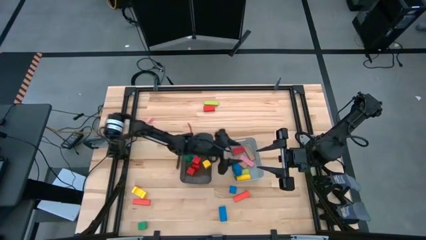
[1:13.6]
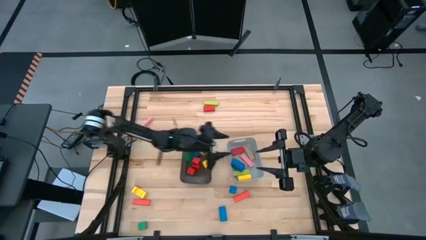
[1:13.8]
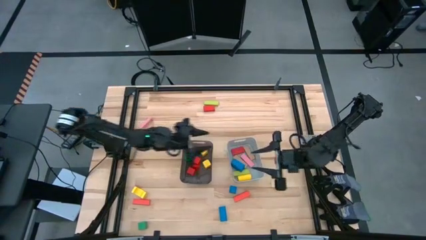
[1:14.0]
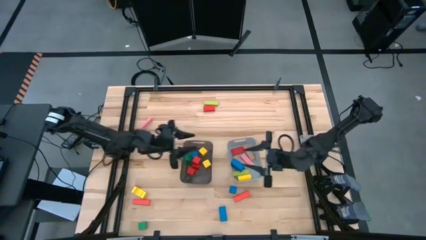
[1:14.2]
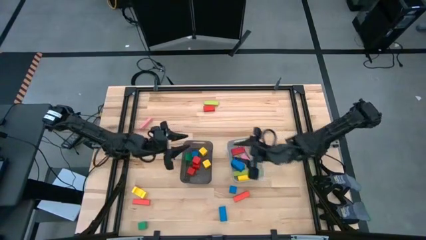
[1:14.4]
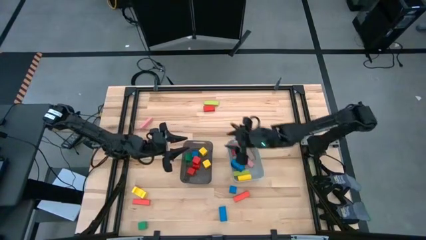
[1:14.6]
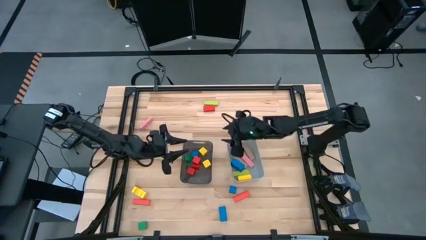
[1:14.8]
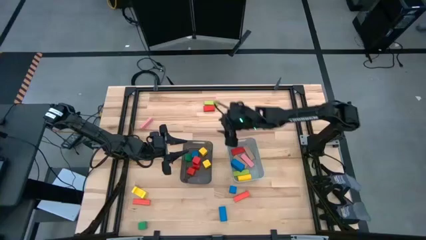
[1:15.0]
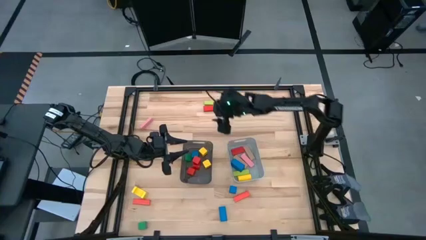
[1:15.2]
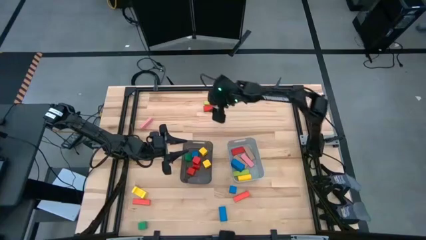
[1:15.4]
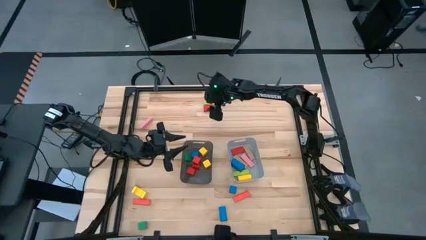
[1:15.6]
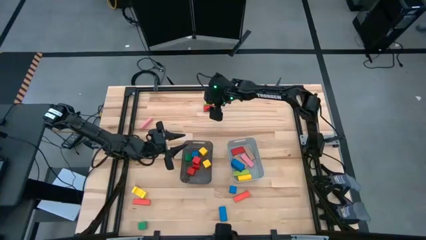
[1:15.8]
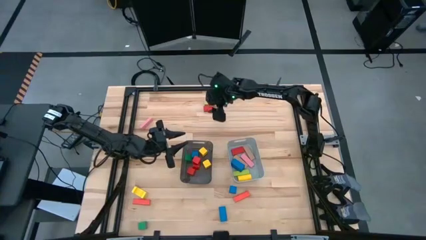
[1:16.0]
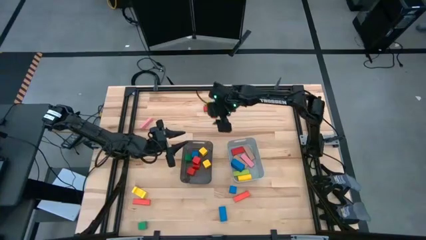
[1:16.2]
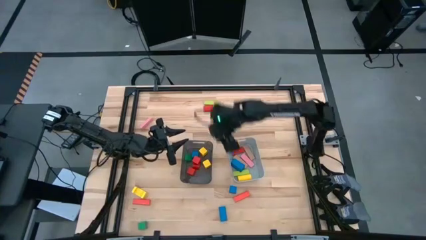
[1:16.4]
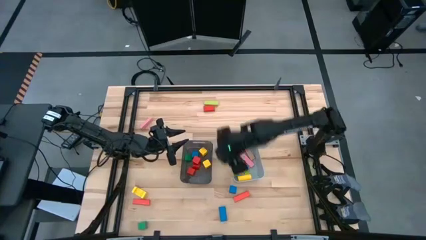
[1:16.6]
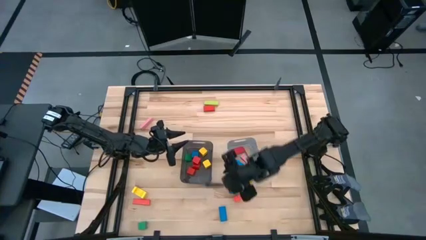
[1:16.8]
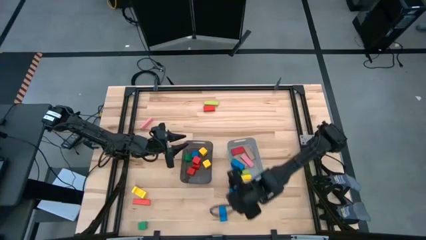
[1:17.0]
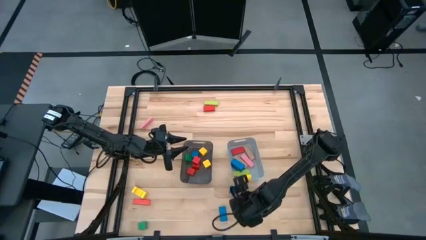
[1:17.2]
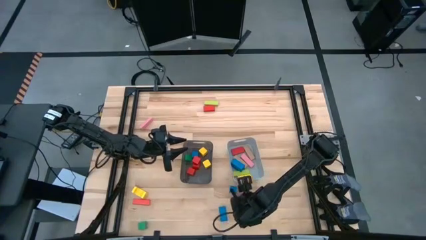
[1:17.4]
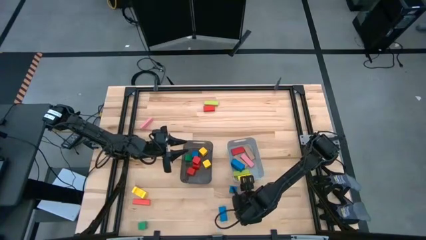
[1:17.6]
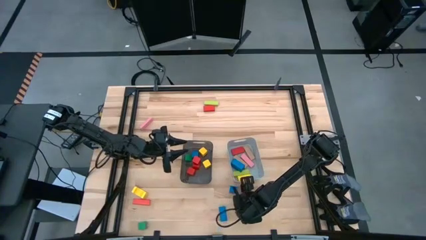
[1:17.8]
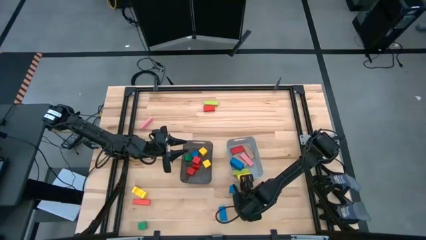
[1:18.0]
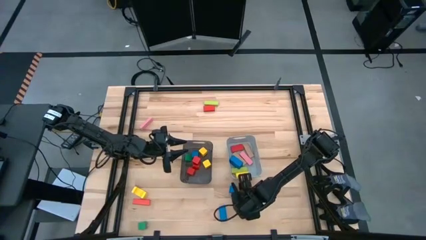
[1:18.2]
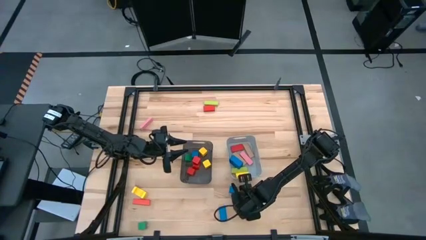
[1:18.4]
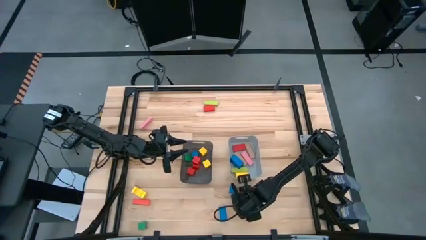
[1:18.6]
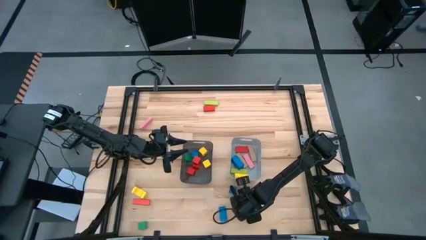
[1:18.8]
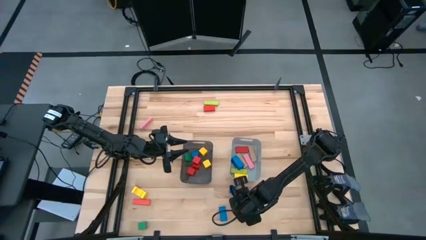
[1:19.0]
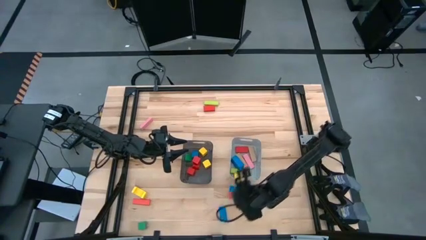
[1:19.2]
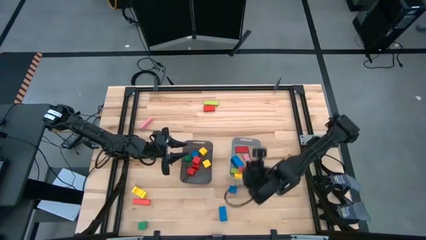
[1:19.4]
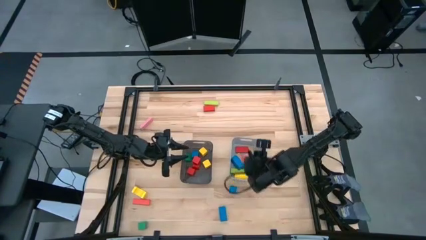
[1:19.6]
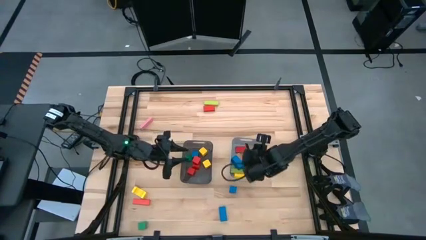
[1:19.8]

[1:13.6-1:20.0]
Task: Sort blocks by size
Put the right large orange block into the gray bin

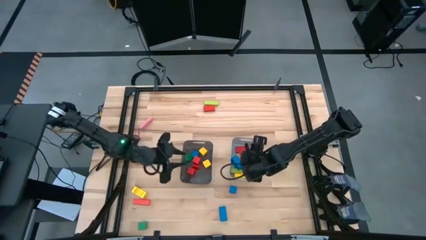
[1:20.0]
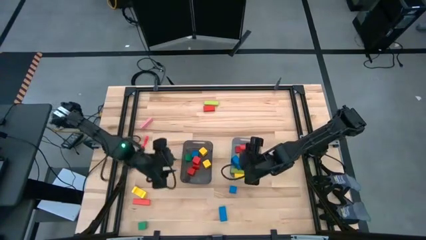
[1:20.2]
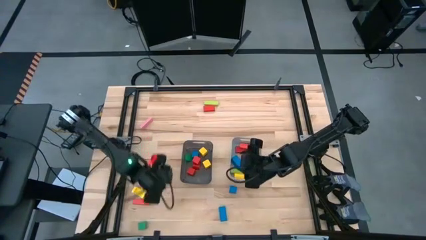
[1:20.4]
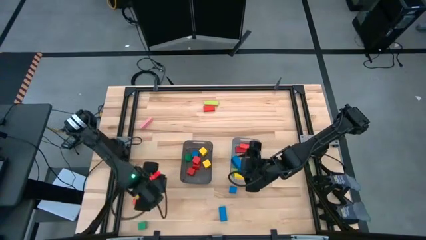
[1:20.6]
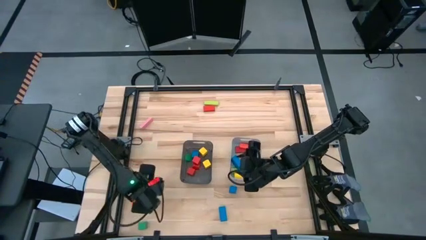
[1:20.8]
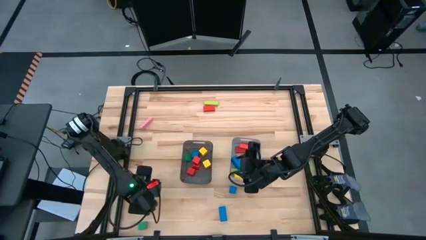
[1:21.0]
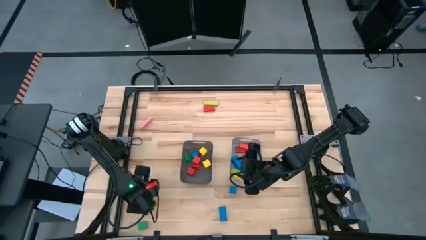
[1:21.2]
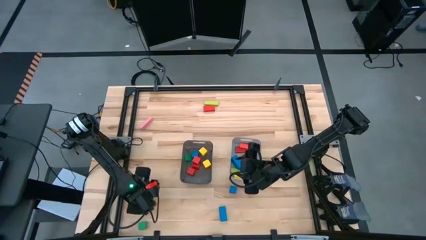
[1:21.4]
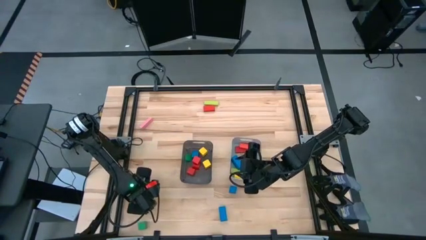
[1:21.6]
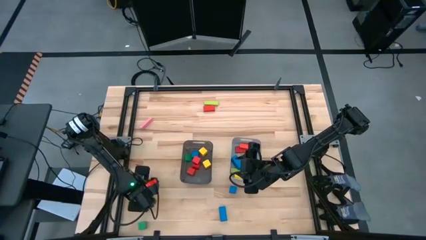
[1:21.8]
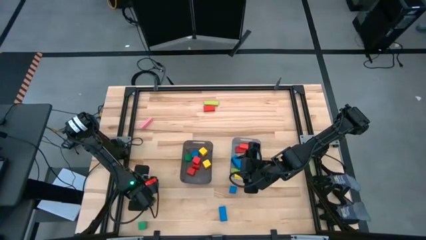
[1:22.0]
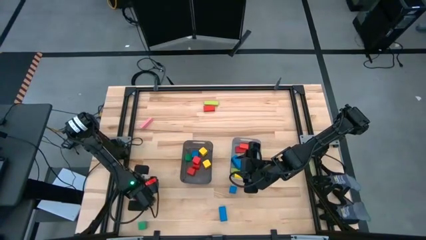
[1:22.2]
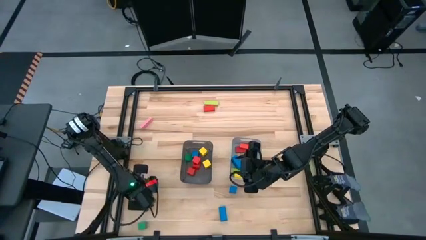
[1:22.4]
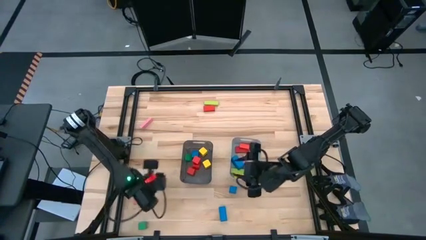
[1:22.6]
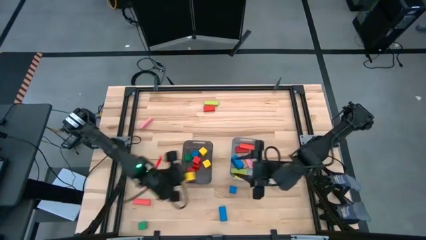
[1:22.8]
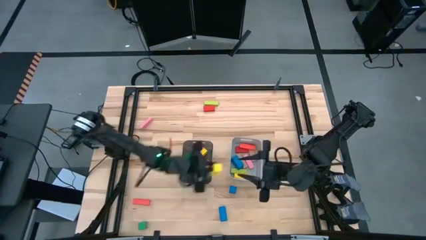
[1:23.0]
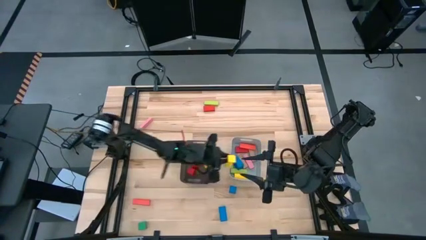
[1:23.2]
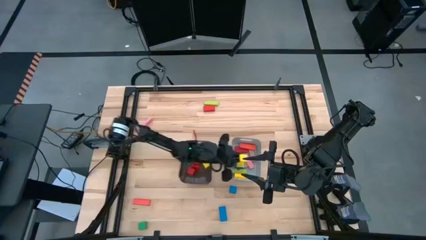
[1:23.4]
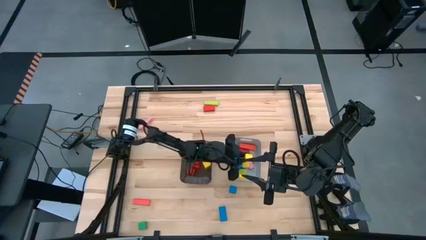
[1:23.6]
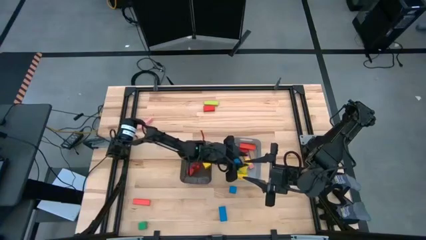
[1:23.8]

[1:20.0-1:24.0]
Put the large yellow block into the gray bin

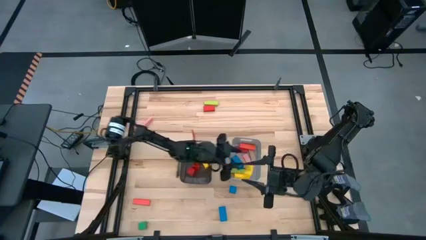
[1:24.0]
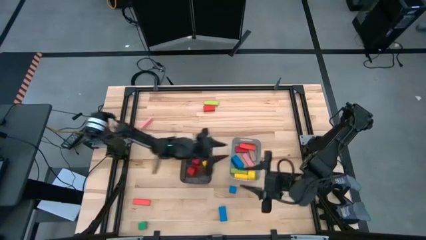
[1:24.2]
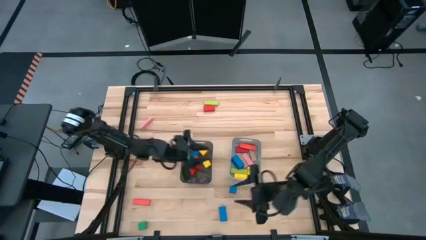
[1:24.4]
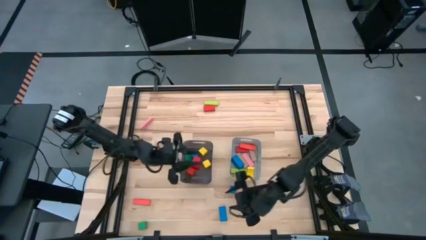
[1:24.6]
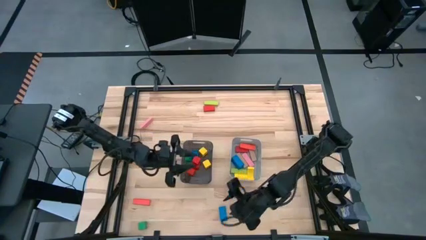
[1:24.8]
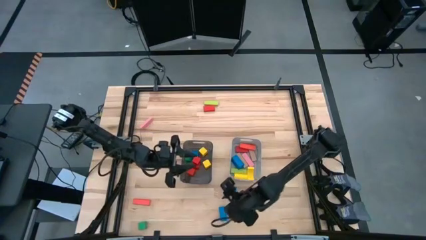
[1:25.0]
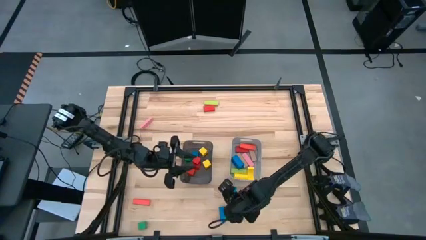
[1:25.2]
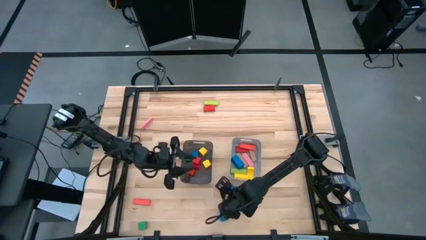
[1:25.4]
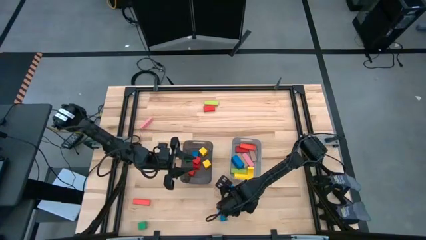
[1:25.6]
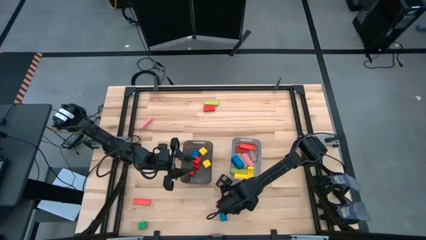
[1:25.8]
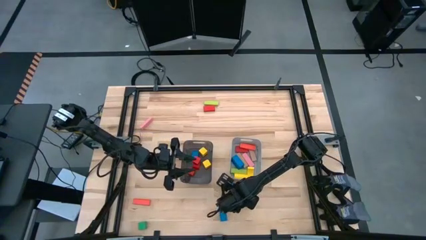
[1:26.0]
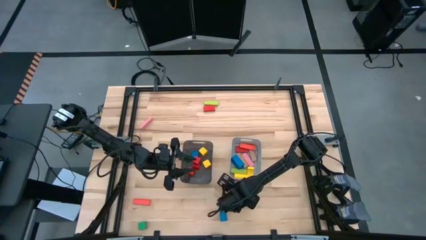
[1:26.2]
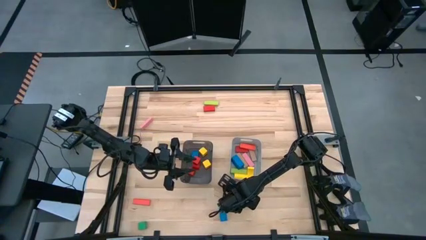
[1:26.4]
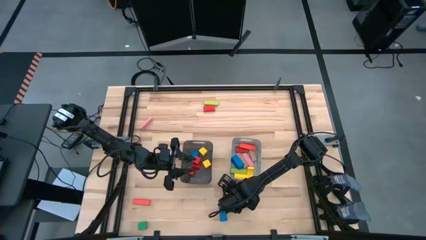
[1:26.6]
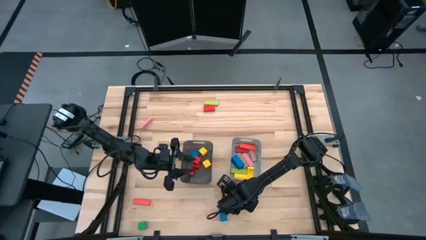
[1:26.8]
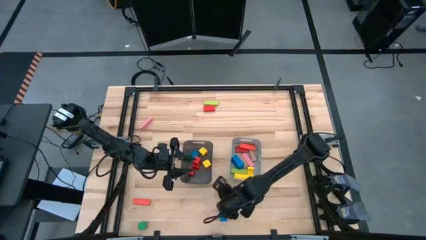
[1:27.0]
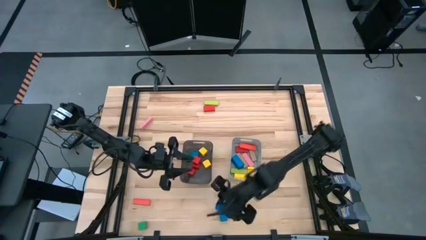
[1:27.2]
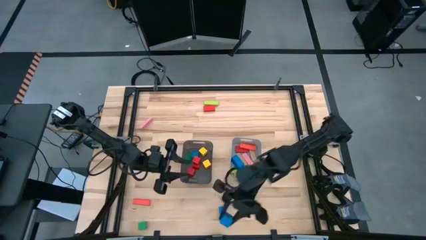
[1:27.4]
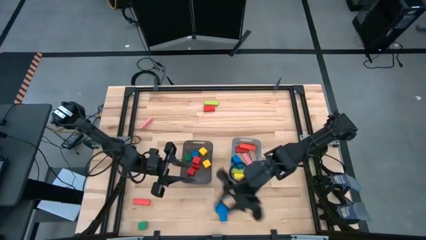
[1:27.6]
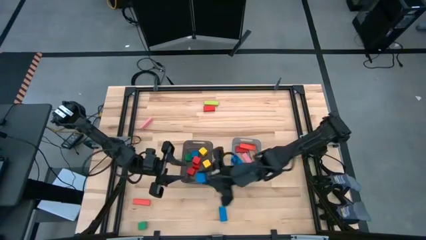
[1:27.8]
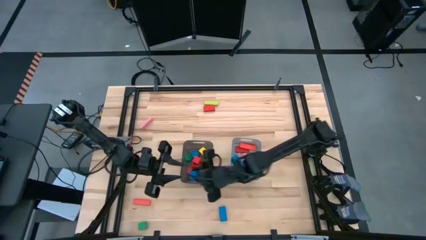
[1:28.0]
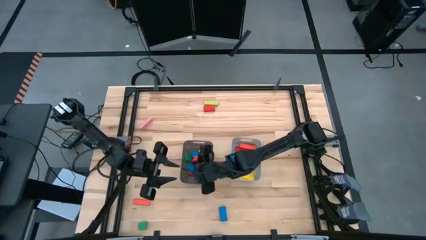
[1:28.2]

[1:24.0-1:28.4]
Put the small blue block into the black bin

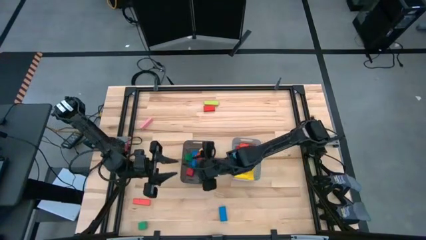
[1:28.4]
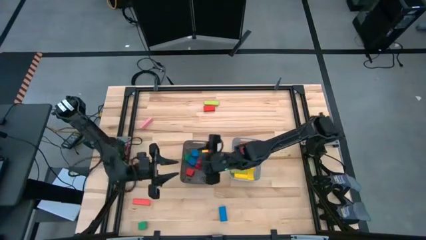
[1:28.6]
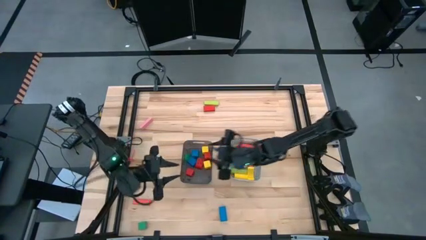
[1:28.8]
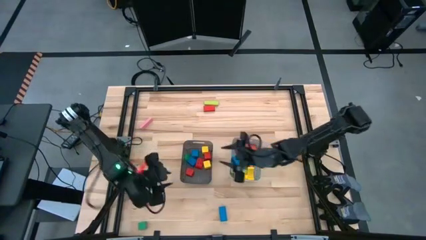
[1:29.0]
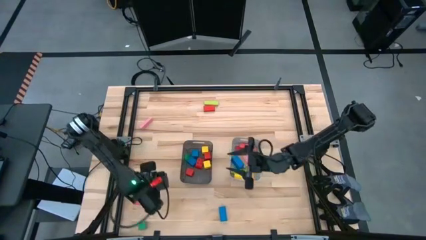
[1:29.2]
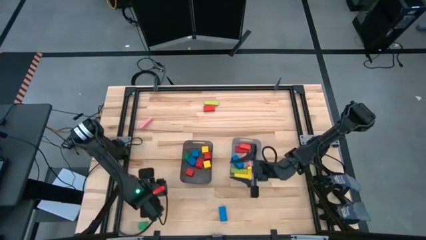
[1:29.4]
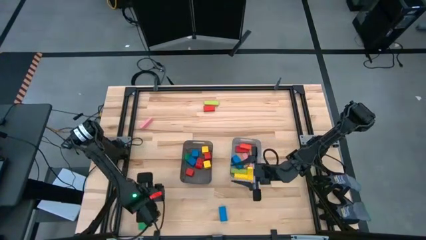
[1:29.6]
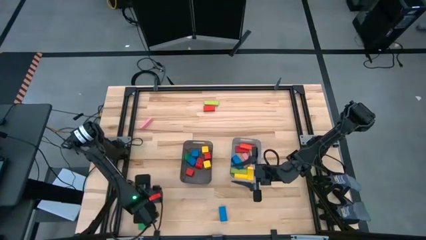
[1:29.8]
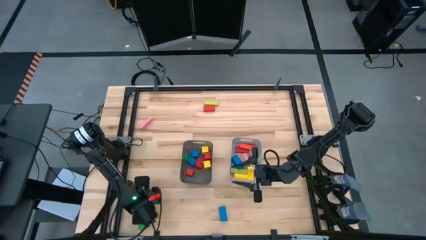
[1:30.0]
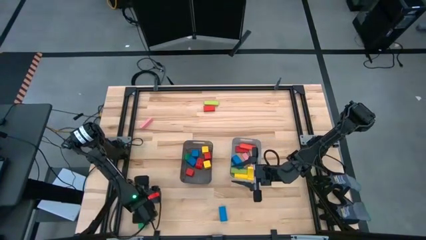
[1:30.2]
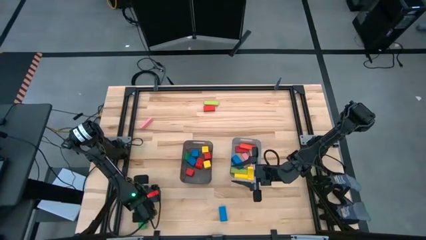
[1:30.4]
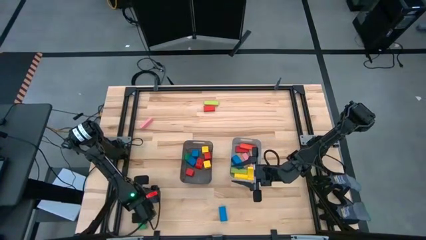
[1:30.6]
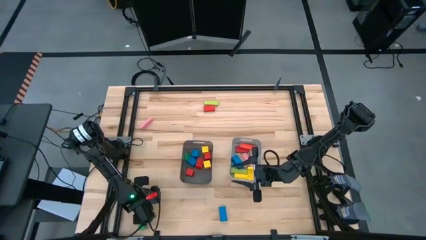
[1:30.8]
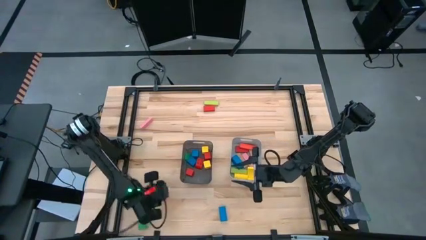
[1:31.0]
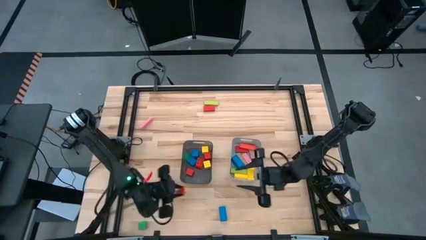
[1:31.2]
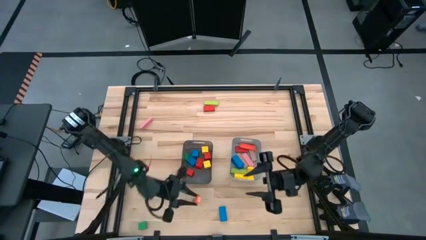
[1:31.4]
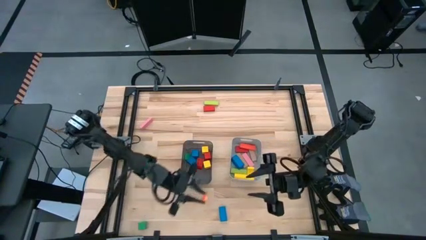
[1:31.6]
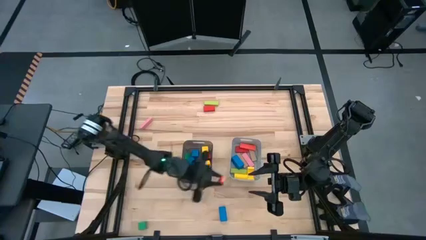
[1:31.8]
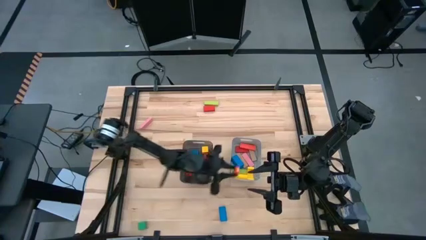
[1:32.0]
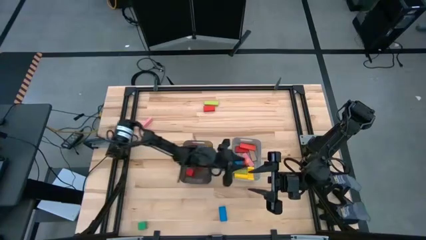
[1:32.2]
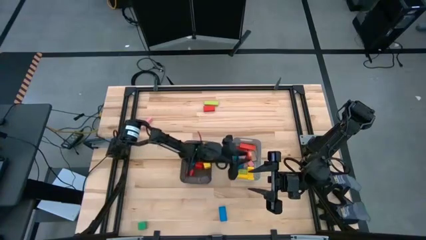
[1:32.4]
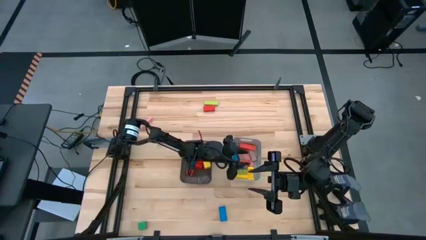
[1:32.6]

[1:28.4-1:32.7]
Put the large orange block into the gray bin
